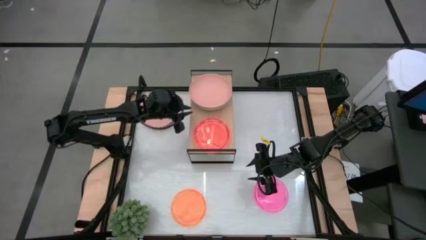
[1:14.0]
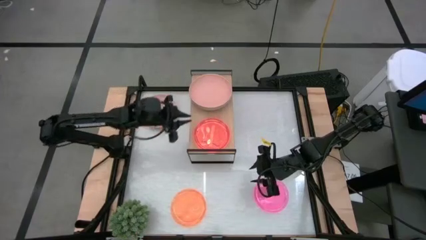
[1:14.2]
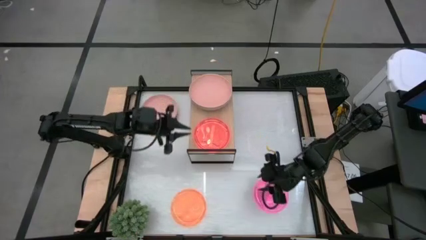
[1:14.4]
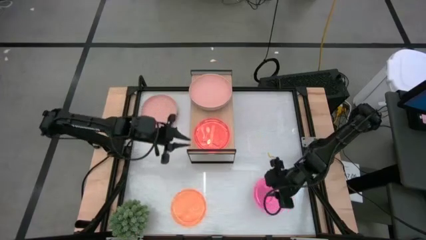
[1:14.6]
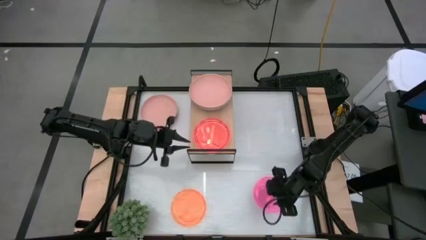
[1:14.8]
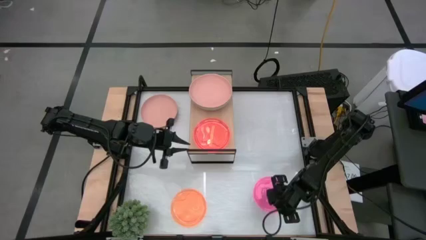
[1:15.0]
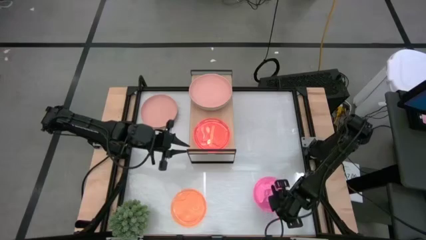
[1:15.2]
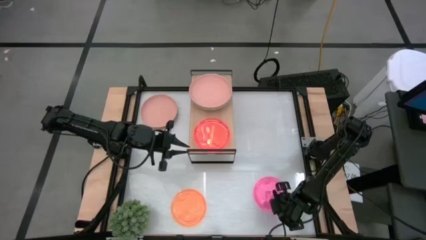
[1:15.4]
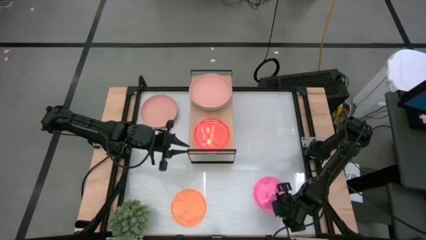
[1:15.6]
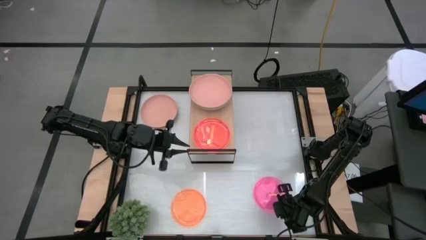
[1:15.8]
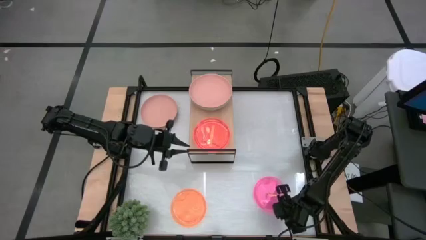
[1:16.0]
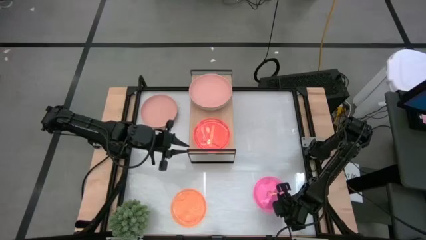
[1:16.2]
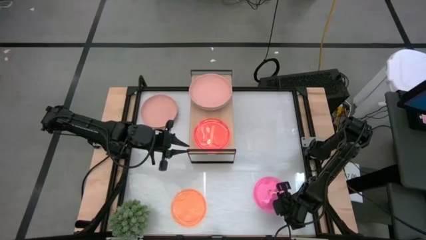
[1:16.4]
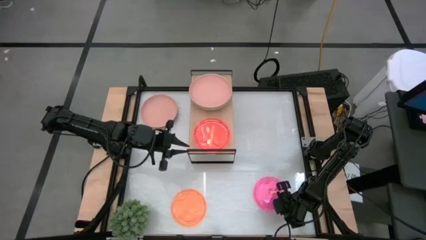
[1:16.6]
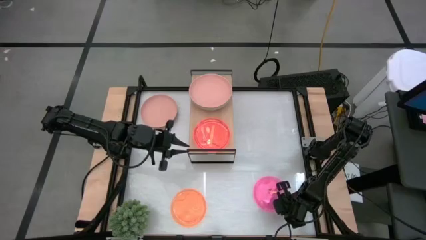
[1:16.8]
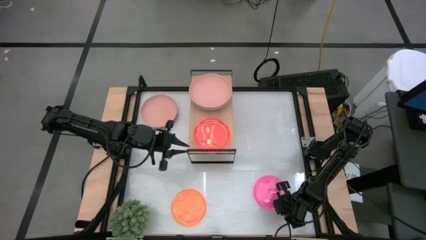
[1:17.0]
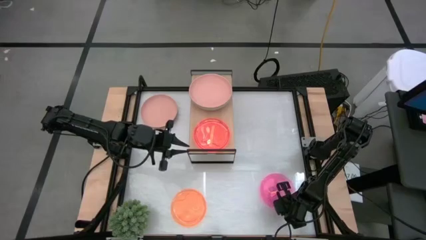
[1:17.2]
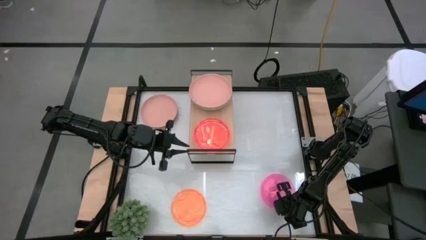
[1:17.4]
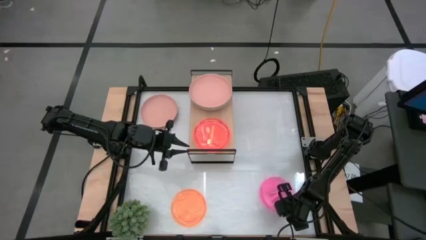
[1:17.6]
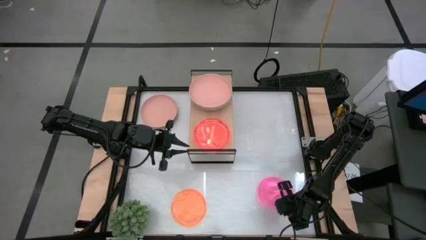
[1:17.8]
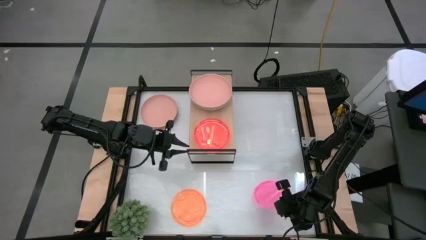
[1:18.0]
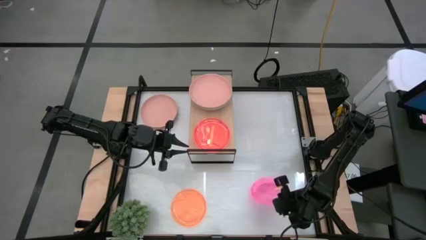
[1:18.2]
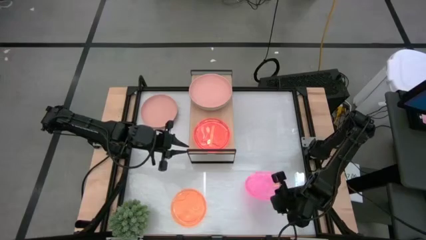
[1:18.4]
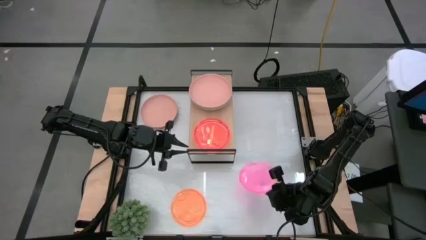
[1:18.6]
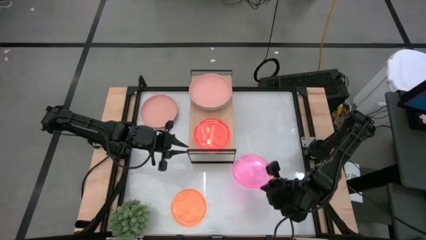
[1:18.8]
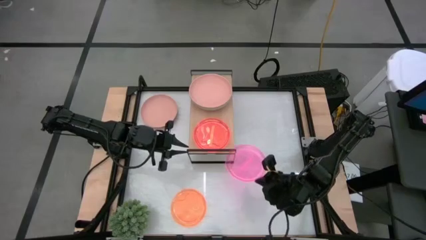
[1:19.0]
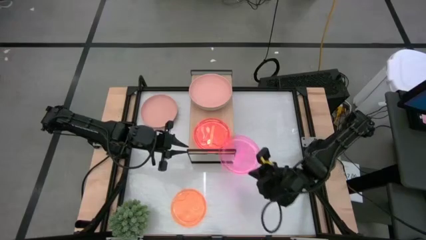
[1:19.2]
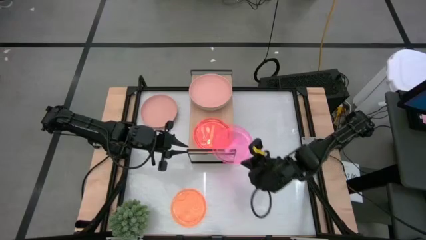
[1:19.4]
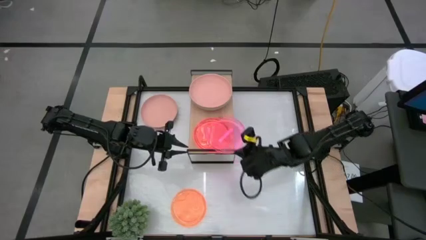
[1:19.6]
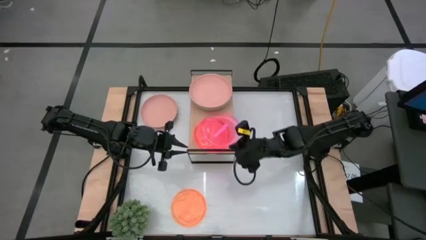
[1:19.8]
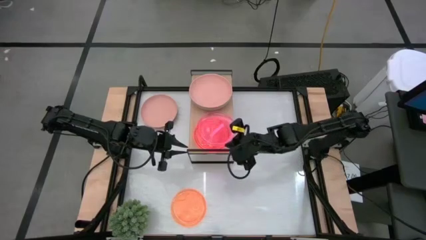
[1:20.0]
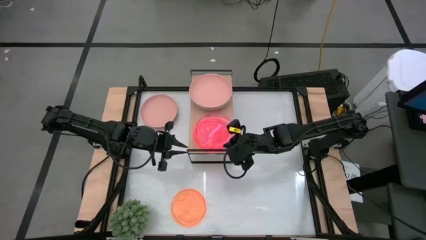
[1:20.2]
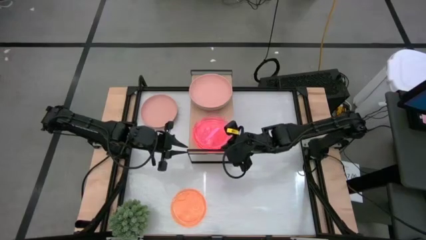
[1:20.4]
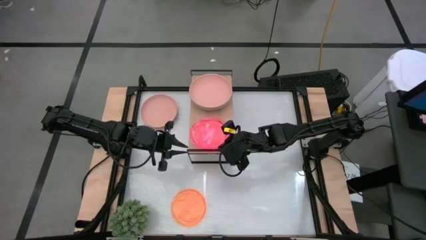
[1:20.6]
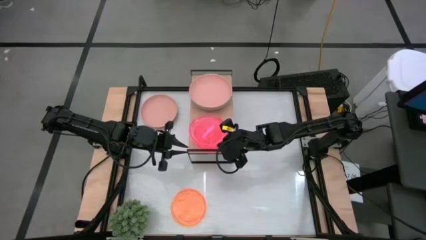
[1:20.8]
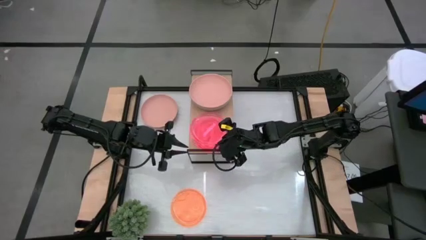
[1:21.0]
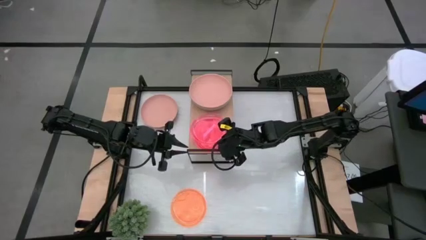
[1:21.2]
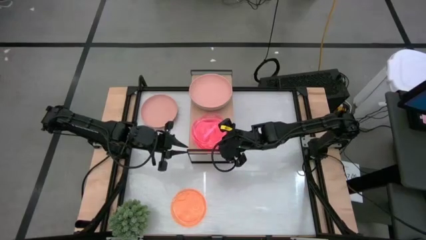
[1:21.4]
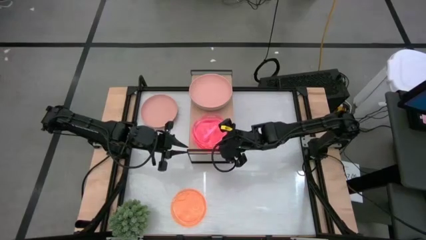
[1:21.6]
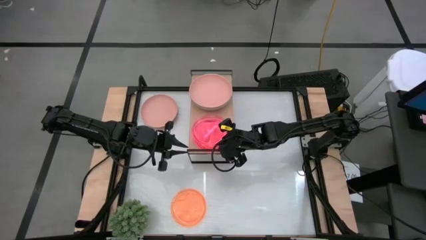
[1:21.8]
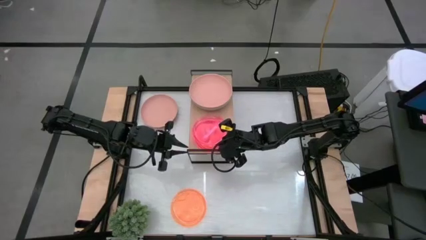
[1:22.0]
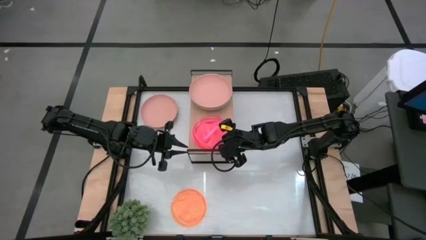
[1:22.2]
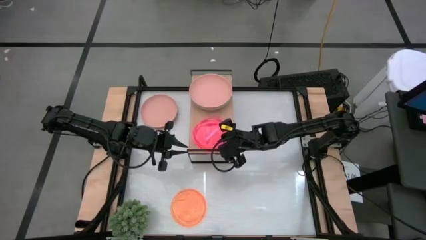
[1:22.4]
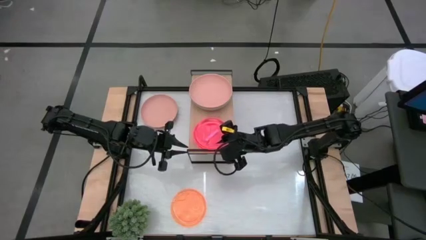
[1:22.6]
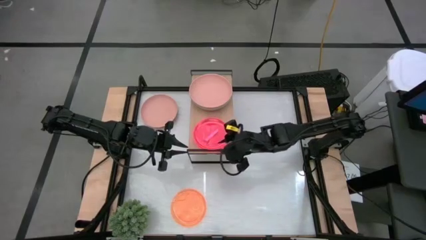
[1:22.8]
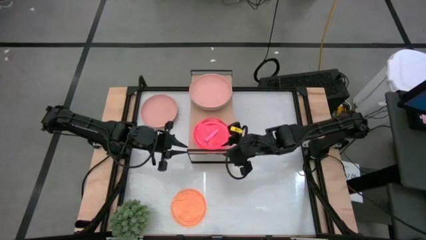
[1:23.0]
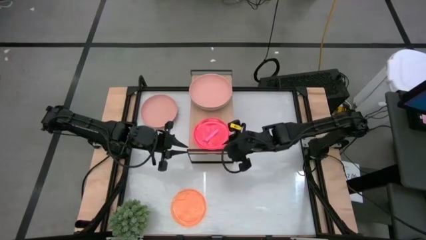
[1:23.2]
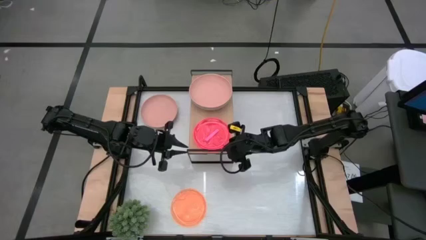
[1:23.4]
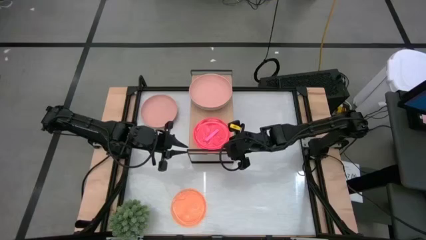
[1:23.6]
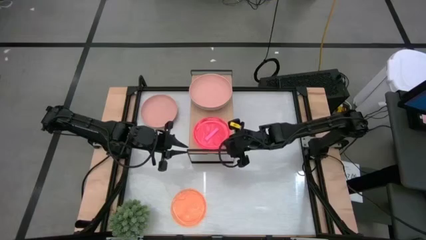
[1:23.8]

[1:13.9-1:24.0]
Task: Place and stack plates onto a shelf
Stack the pink plate on top of the orange plate on the shelf

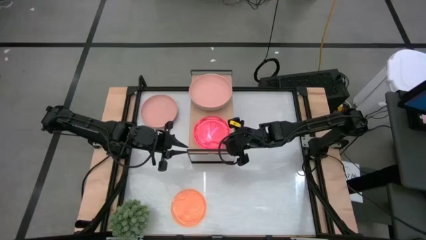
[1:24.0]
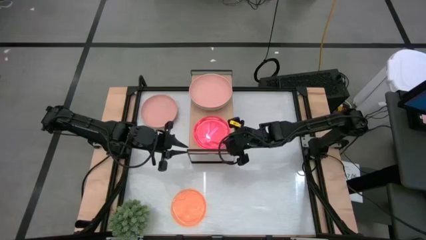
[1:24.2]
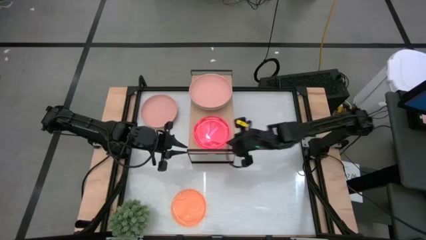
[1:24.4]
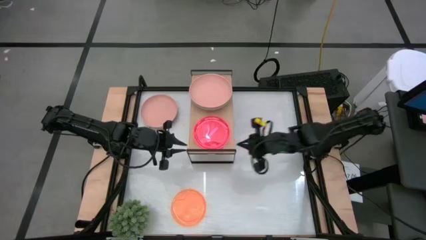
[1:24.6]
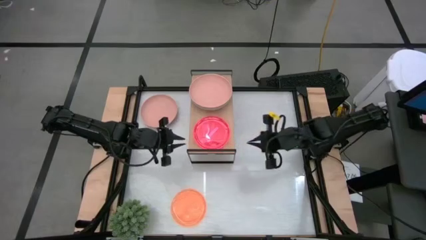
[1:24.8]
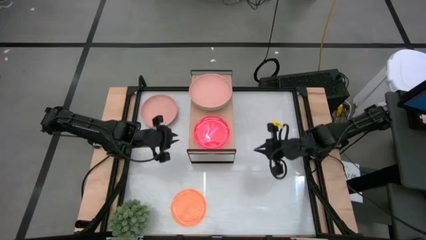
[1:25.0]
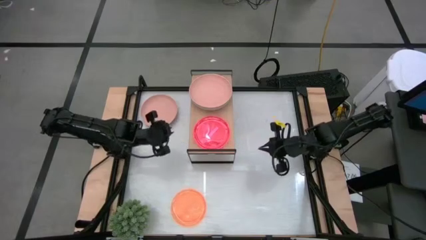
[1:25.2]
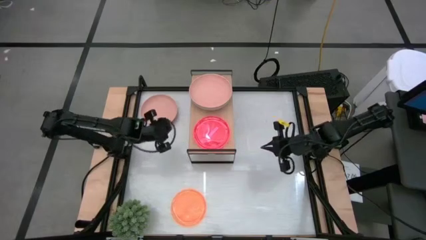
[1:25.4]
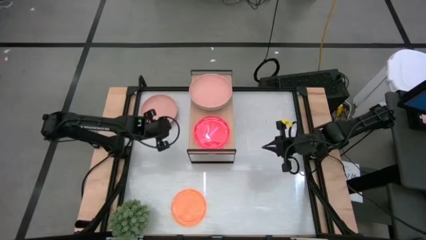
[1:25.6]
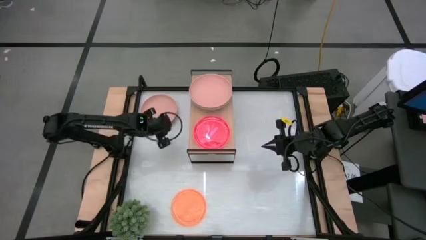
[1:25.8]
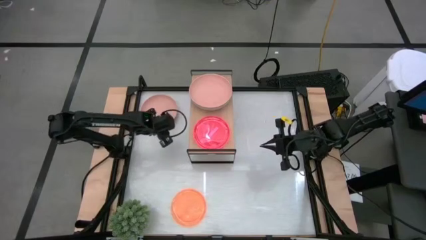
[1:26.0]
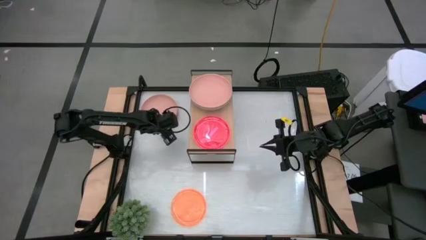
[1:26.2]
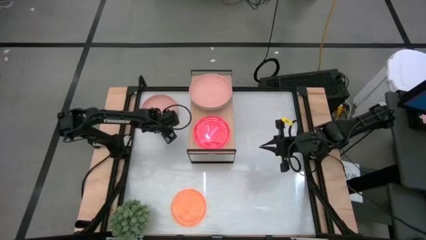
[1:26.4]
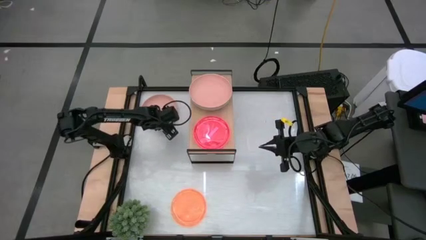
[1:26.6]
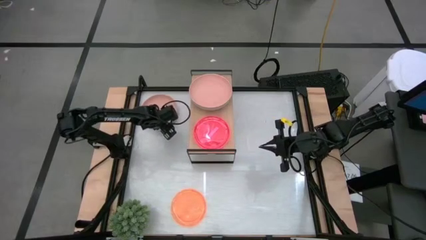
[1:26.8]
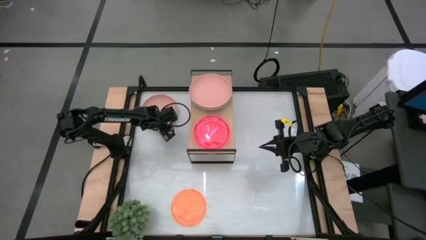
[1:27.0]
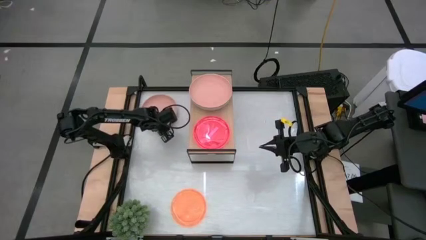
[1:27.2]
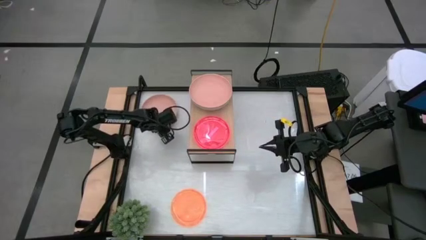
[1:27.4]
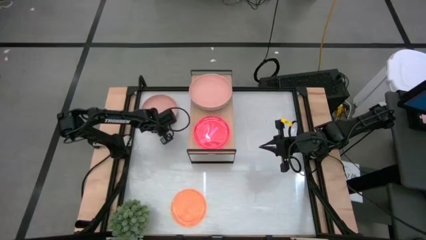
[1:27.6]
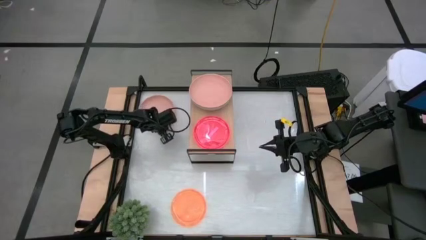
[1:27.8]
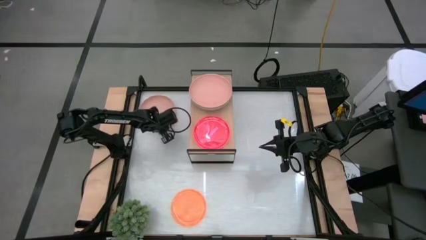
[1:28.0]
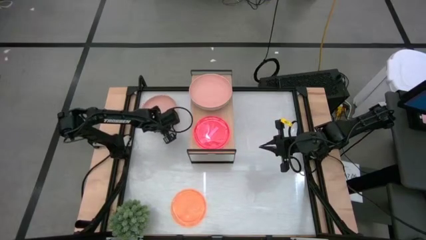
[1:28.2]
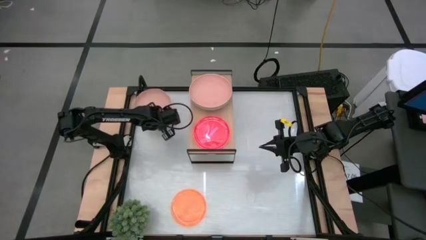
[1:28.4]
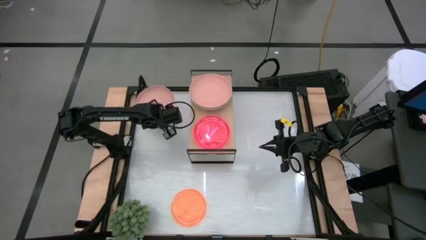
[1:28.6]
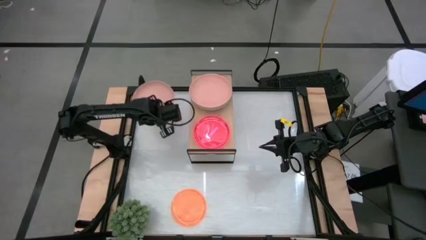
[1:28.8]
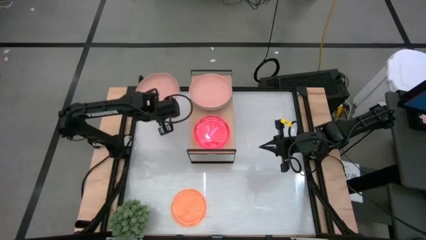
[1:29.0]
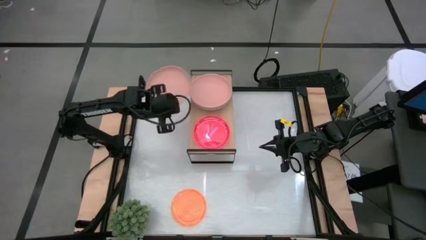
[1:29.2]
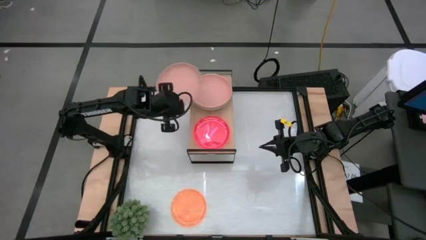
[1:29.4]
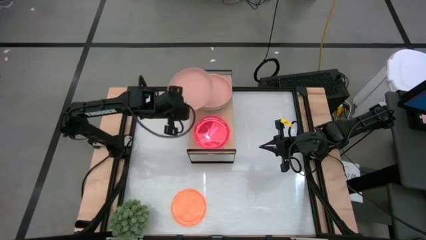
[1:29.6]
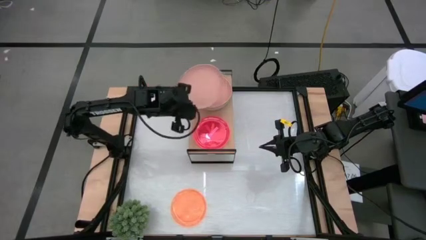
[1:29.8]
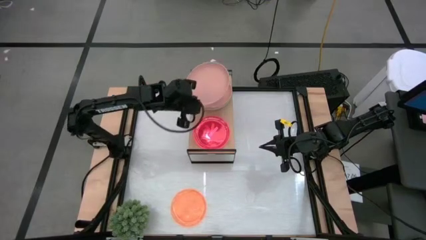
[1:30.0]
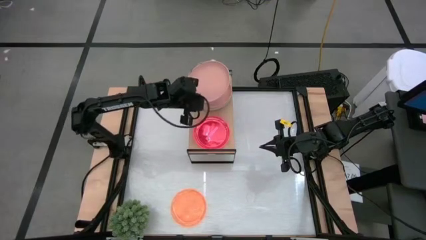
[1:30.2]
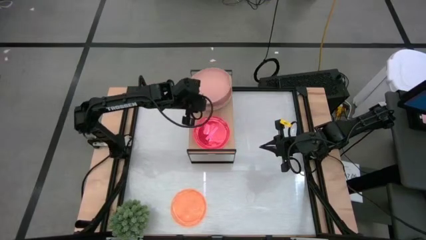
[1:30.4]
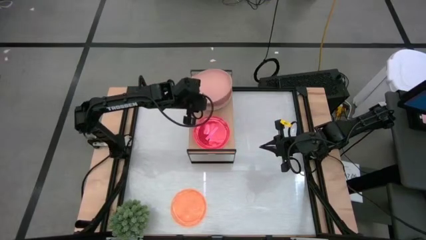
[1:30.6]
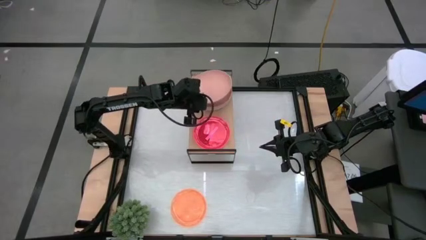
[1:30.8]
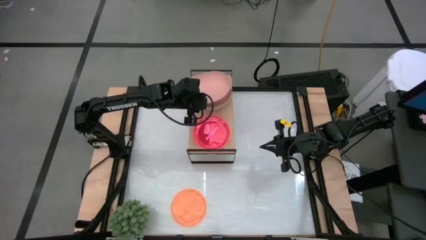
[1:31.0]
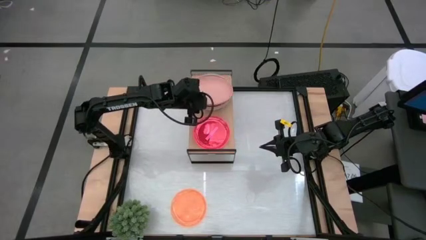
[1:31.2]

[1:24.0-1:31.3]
Stack the light orange plate on top of the light orange plate on the shelf
